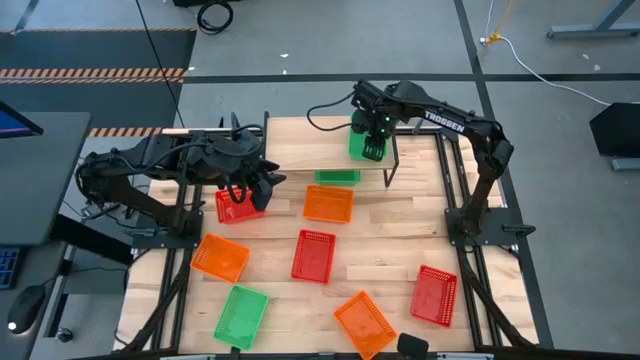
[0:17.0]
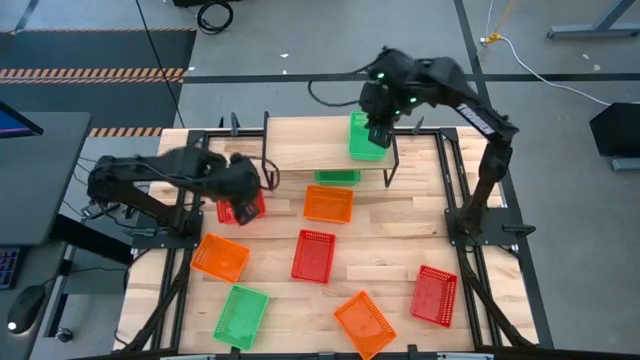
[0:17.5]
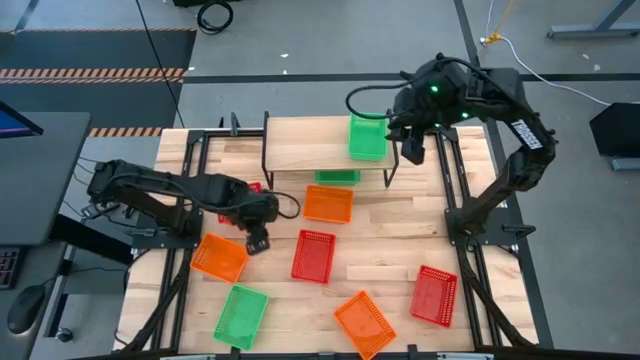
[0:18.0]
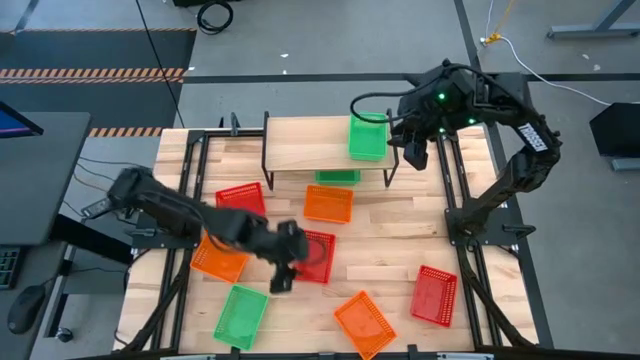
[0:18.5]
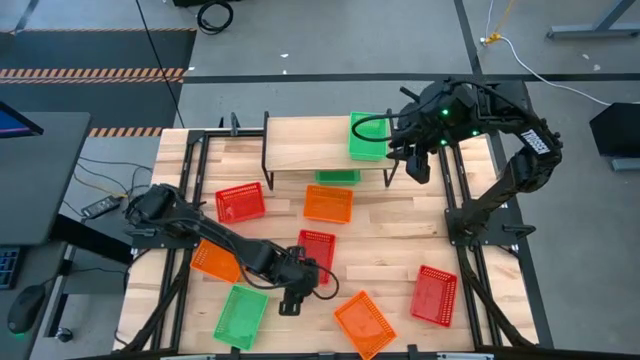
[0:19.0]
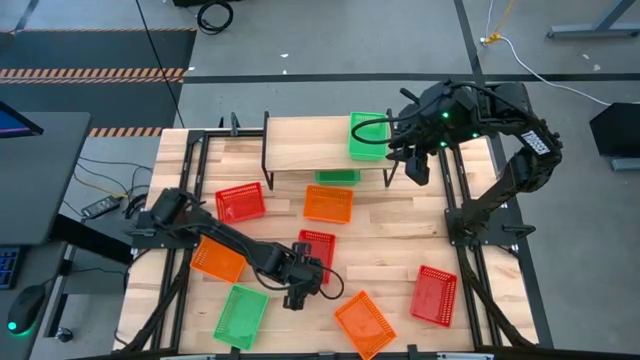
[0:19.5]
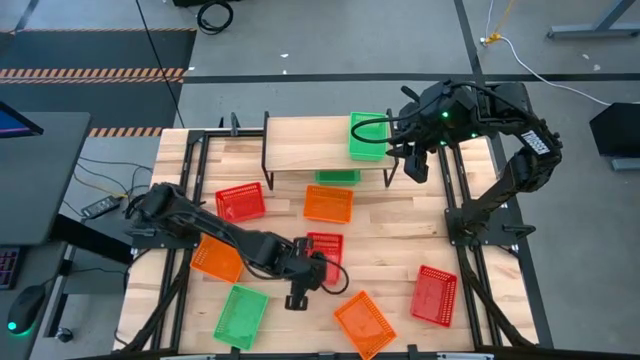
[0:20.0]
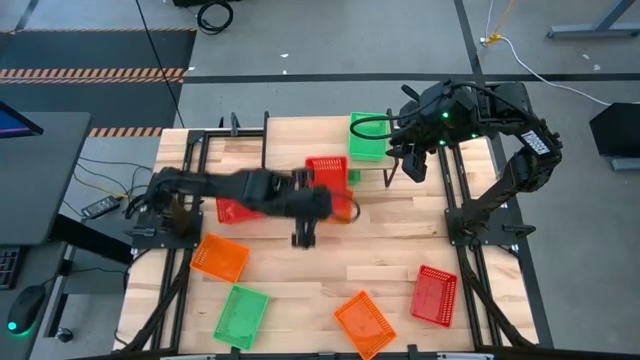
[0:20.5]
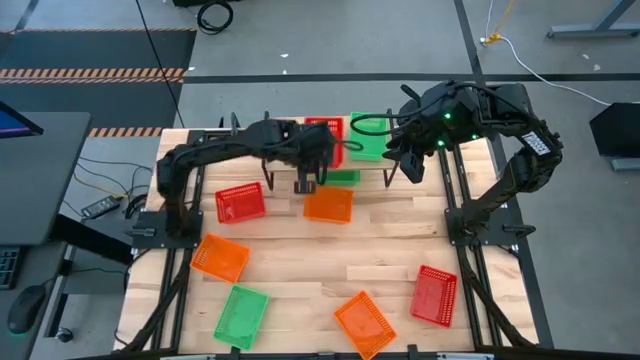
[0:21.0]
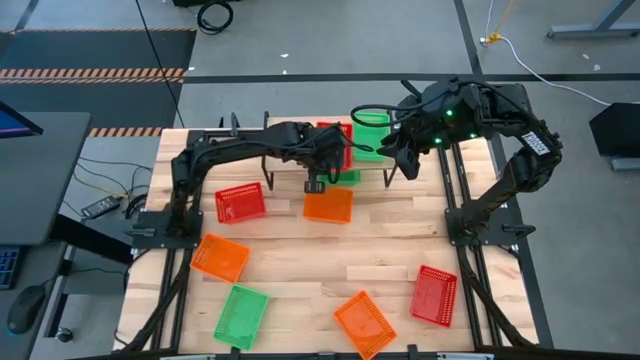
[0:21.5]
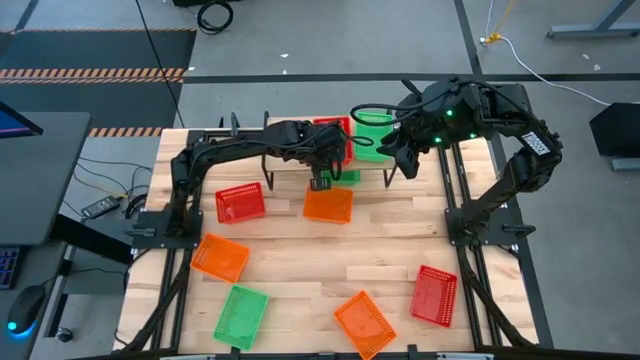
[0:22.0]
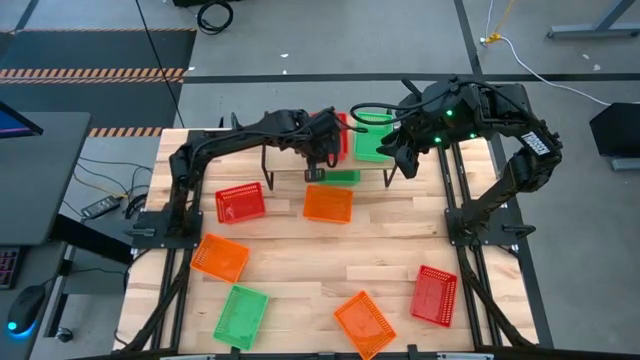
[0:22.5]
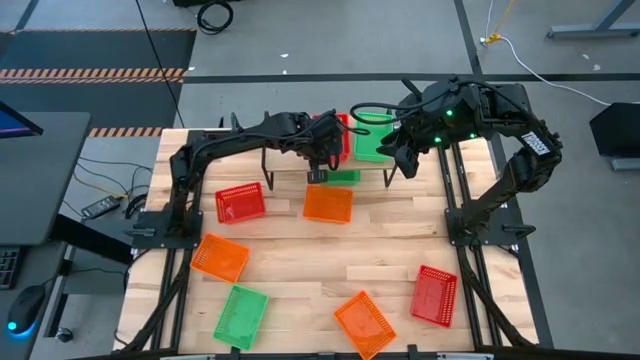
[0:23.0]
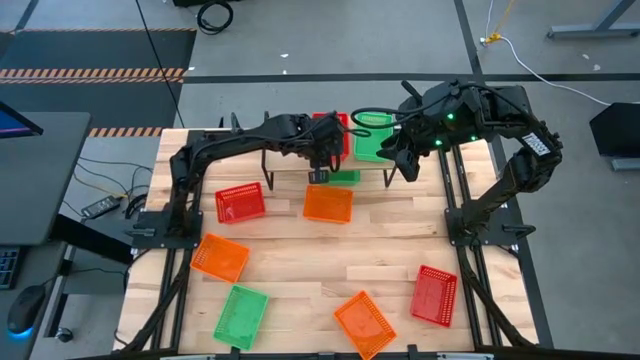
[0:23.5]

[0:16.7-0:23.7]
Task: Stack baskets on shelf by color
Put the middle red bin on the shelf

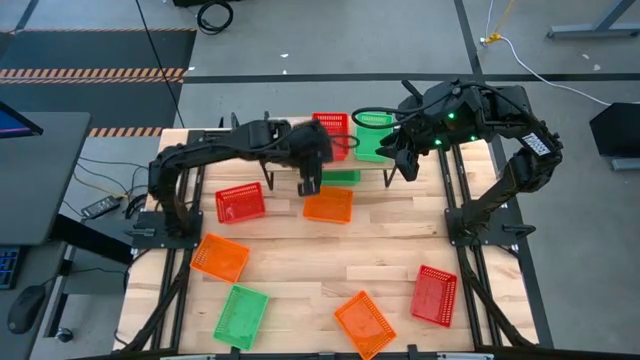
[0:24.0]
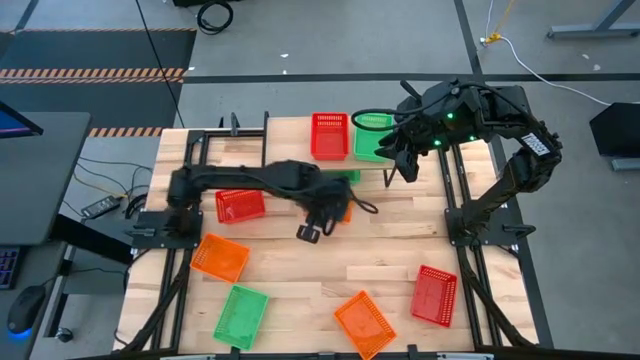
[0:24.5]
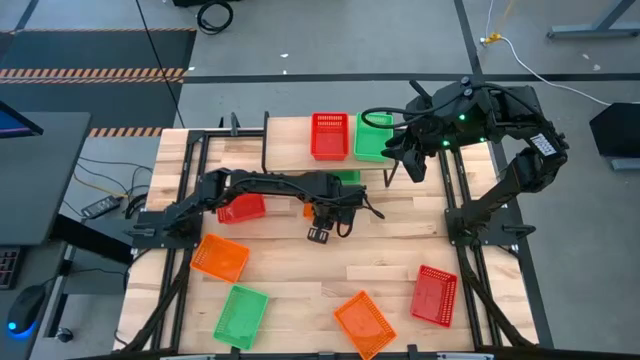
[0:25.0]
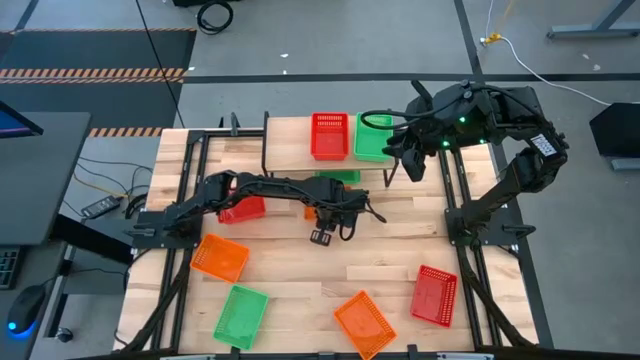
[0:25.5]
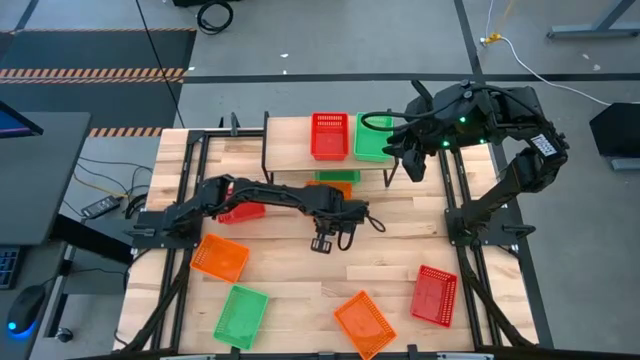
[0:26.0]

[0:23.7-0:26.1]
Put the top orange bin on the shelf

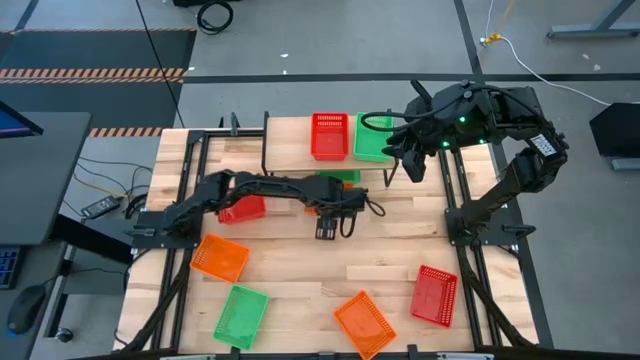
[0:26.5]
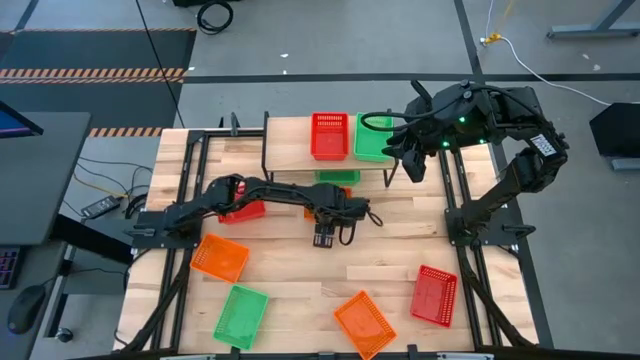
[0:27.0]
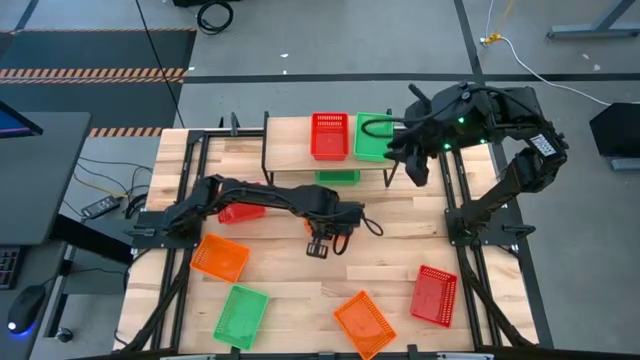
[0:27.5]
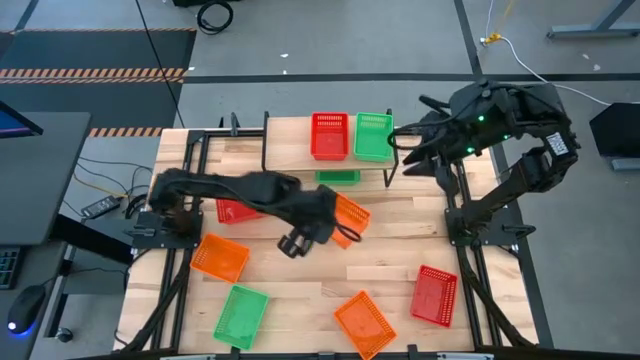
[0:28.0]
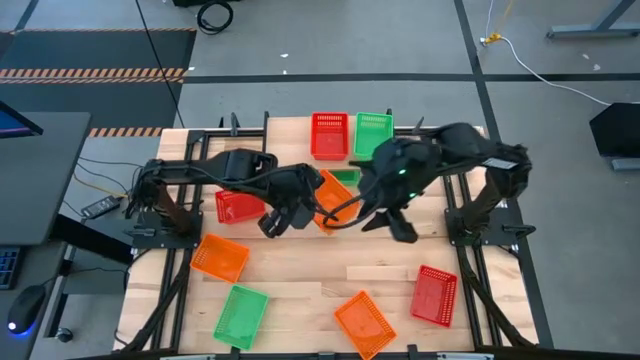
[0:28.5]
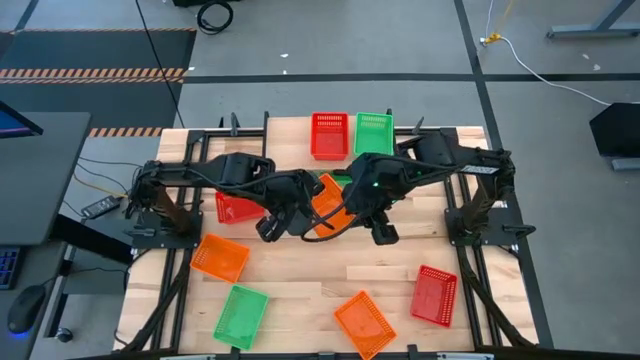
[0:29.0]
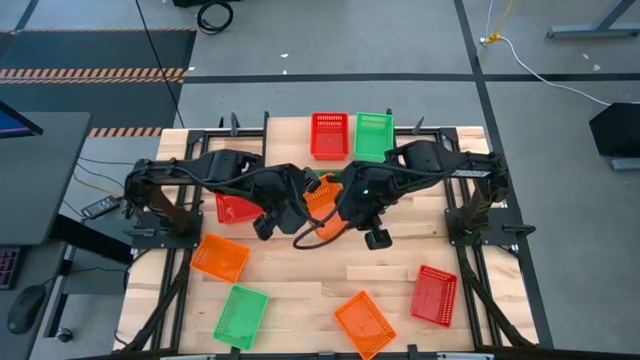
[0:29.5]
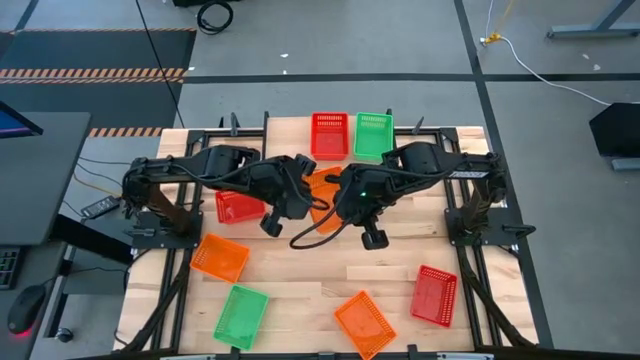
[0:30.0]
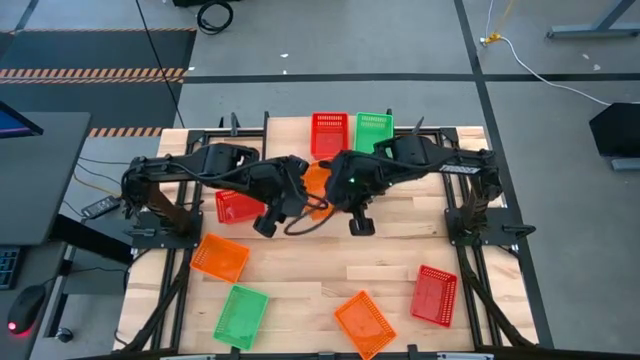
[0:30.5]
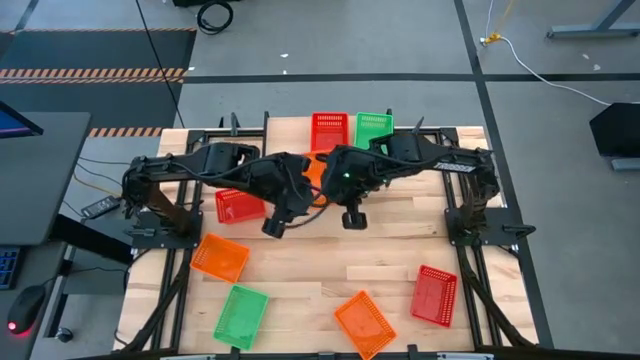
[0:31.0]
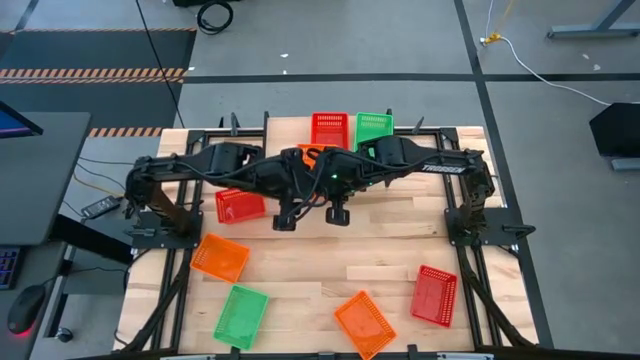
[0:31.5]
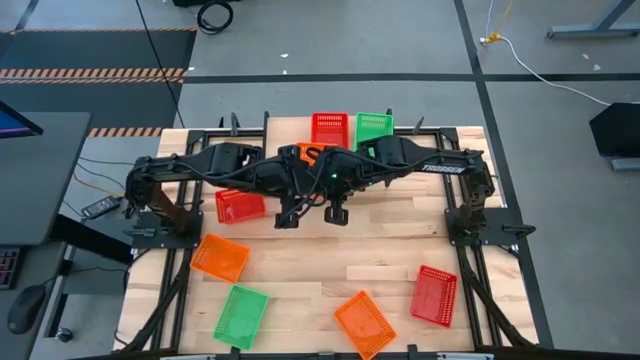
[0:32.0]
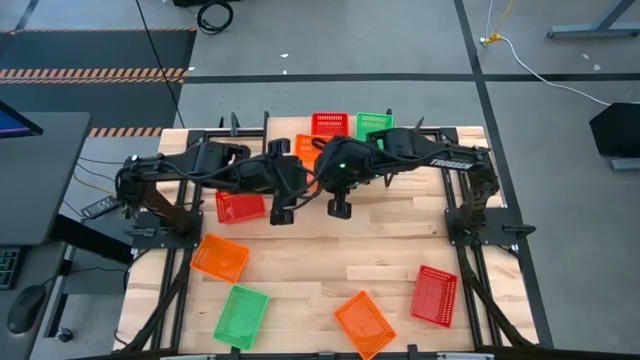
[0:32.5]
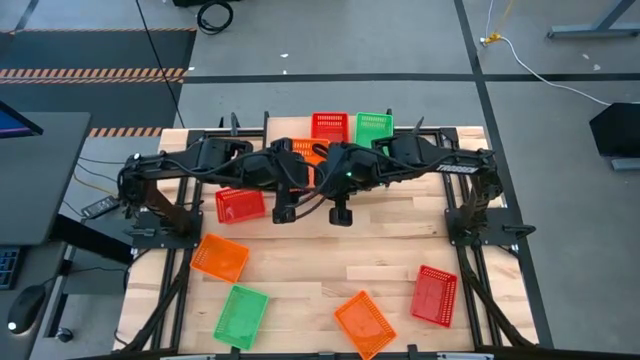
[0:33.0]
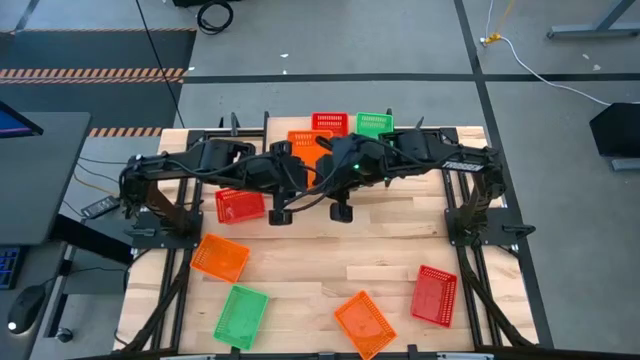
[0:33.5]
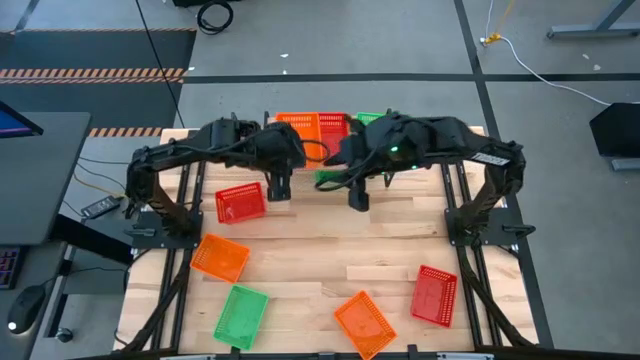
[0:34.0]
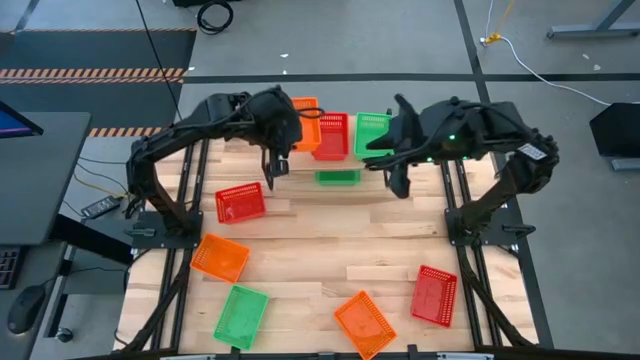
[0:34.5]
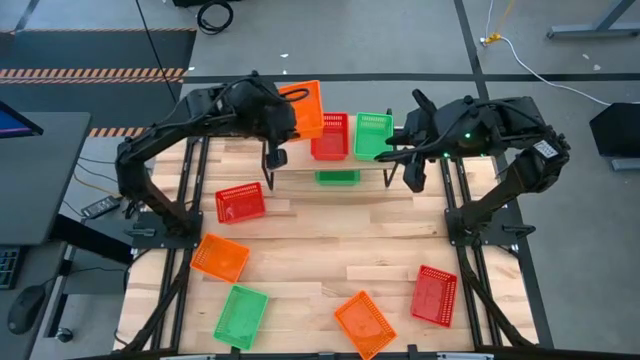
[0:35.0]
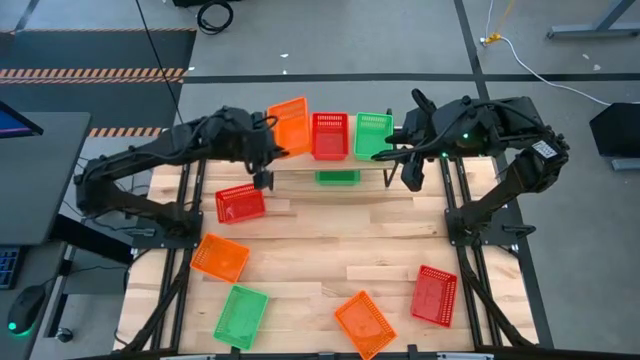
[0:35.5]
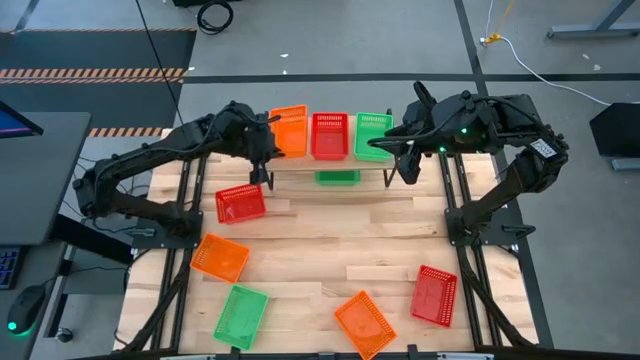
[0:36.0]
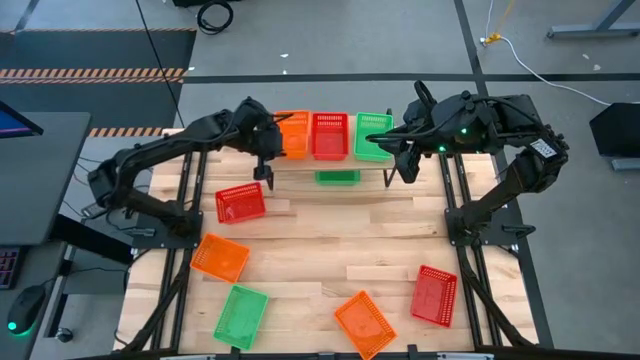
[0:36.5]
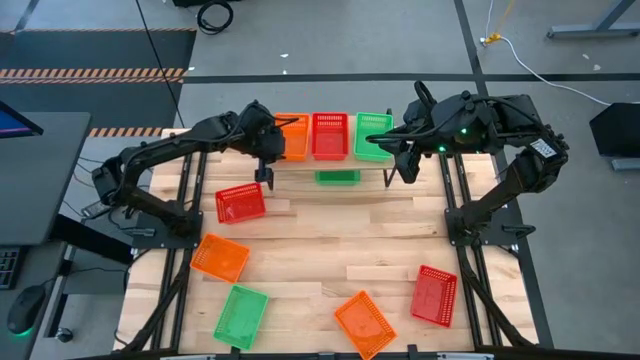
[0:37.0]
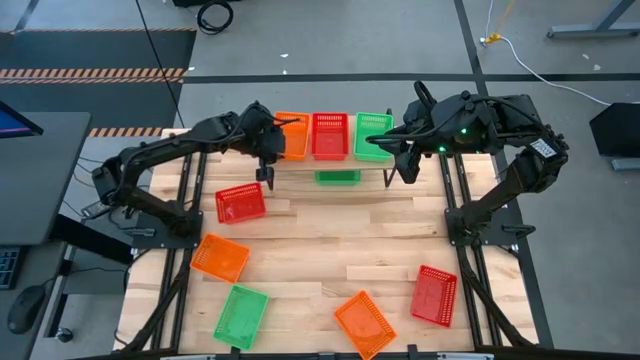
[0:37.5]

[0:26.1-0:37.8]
Put the top orange bin on the shelf
